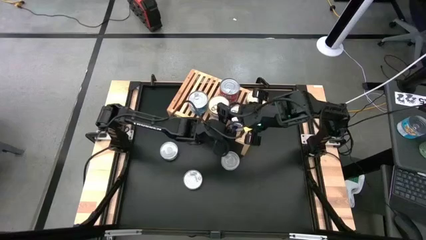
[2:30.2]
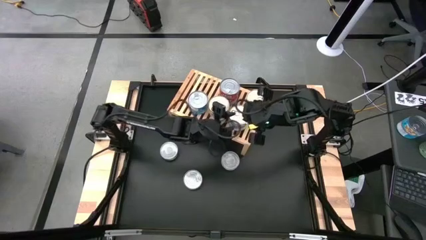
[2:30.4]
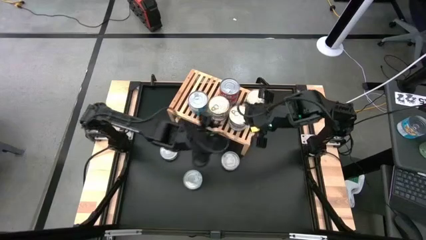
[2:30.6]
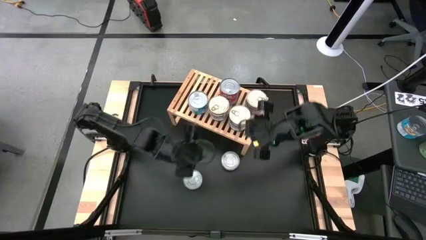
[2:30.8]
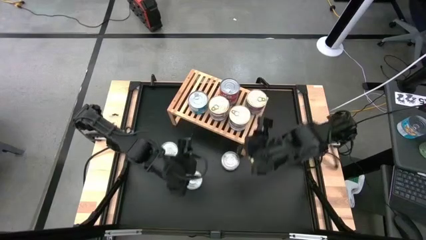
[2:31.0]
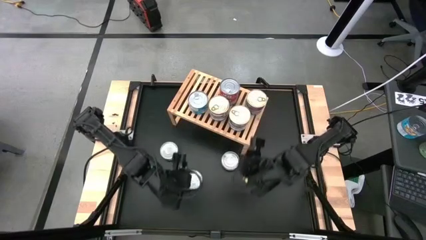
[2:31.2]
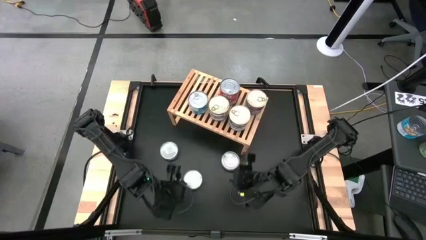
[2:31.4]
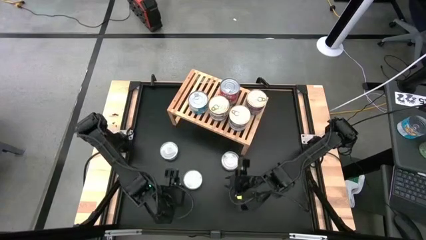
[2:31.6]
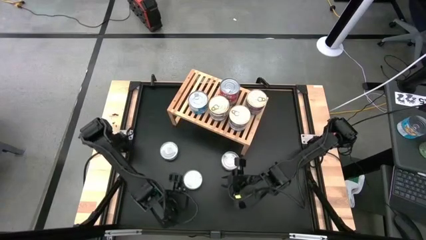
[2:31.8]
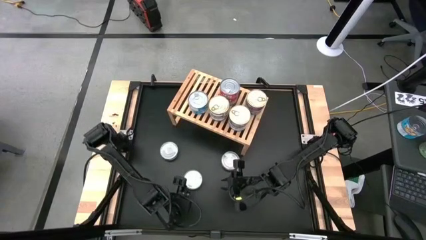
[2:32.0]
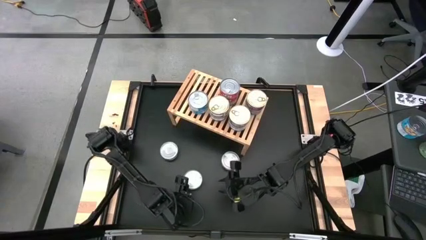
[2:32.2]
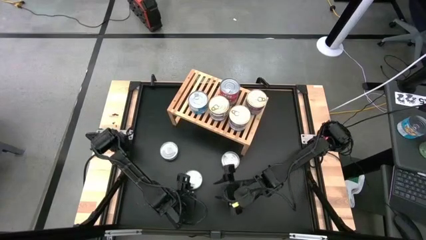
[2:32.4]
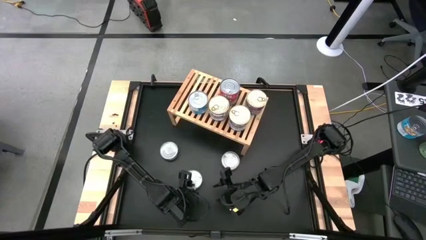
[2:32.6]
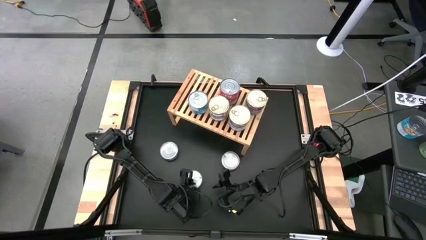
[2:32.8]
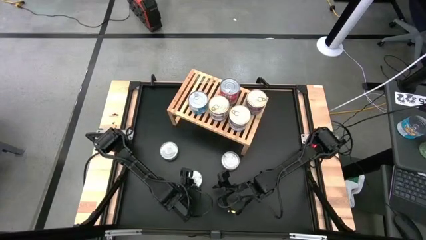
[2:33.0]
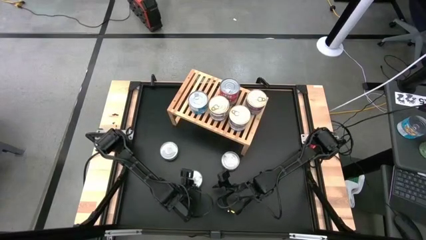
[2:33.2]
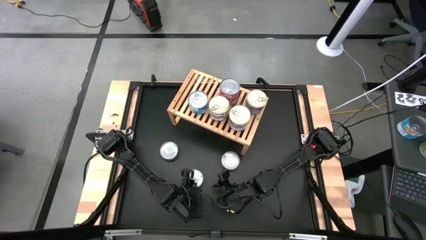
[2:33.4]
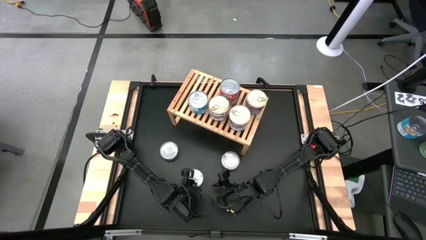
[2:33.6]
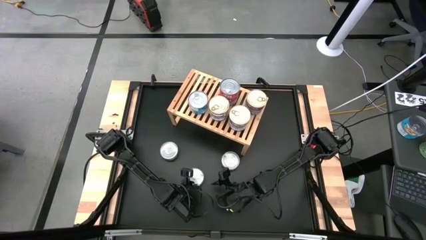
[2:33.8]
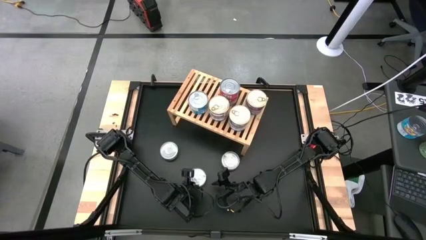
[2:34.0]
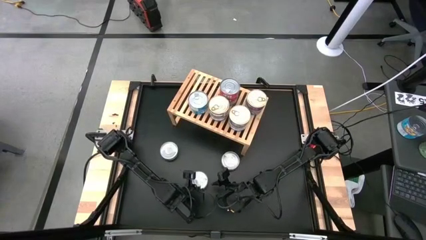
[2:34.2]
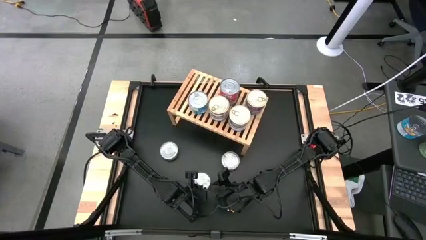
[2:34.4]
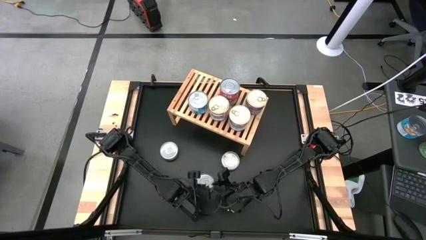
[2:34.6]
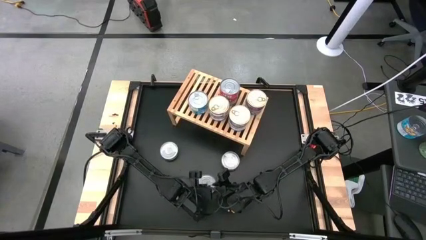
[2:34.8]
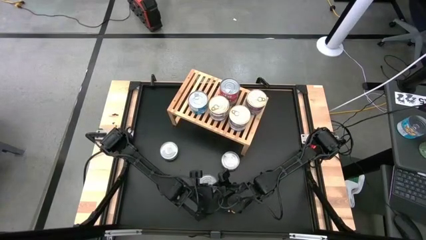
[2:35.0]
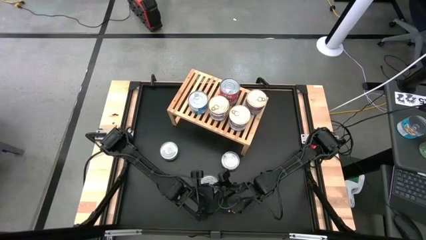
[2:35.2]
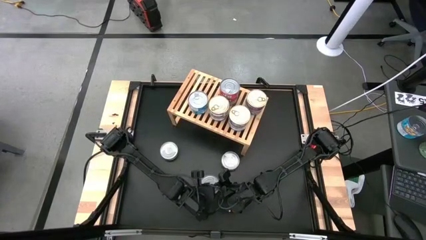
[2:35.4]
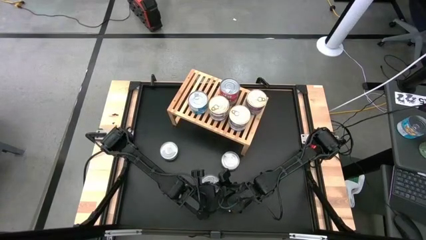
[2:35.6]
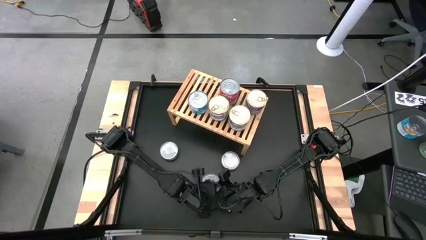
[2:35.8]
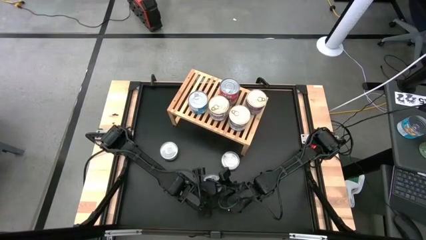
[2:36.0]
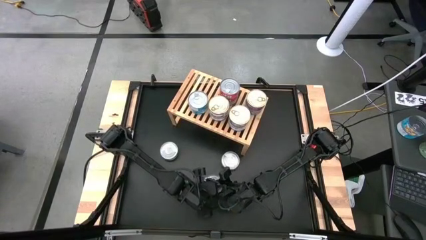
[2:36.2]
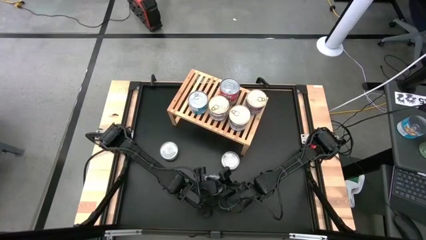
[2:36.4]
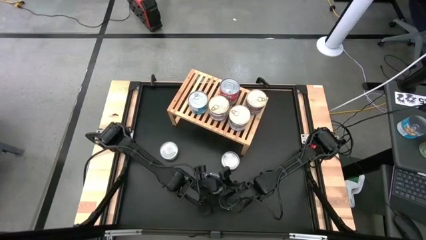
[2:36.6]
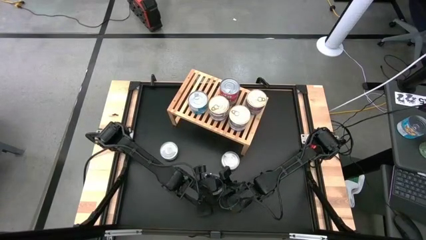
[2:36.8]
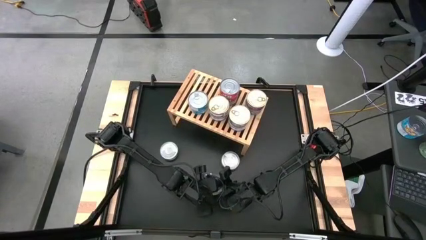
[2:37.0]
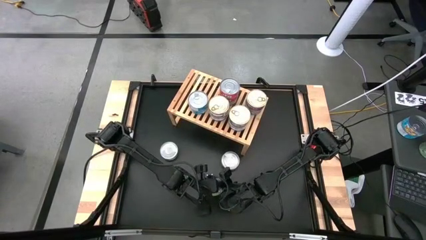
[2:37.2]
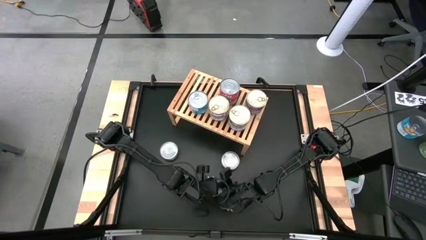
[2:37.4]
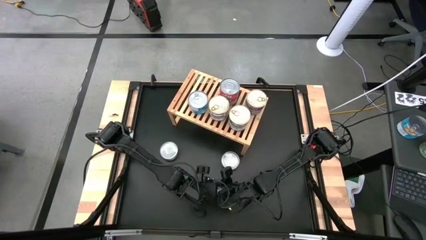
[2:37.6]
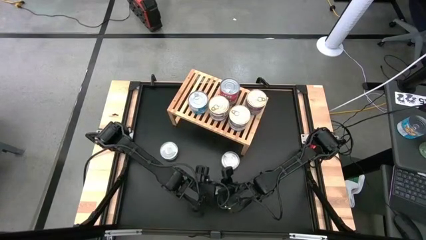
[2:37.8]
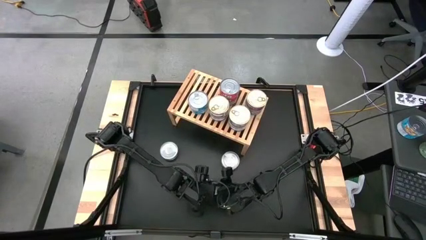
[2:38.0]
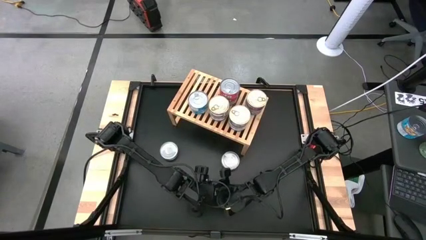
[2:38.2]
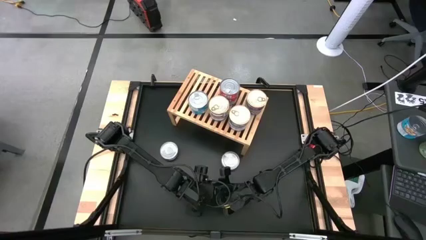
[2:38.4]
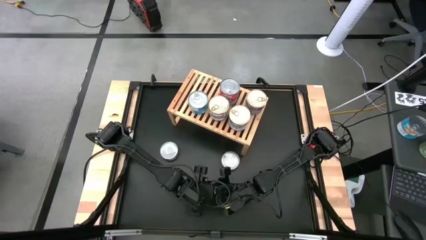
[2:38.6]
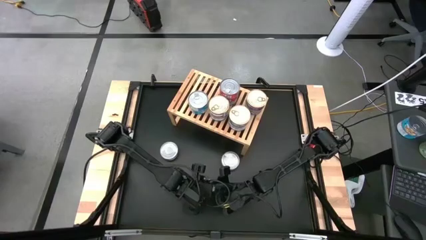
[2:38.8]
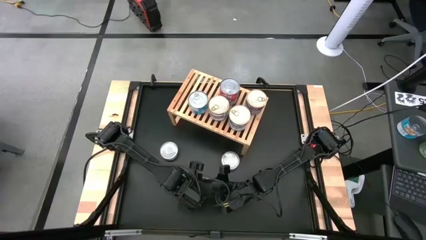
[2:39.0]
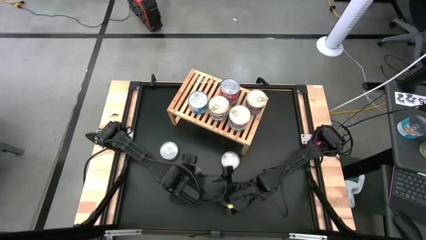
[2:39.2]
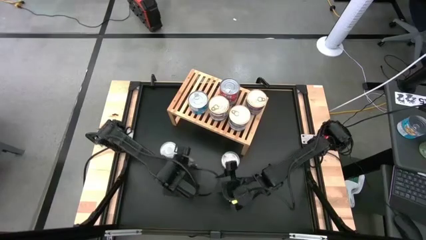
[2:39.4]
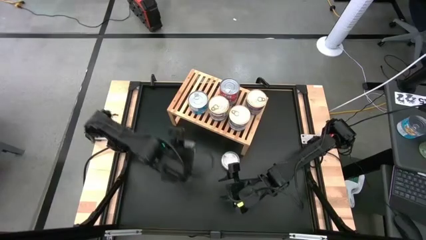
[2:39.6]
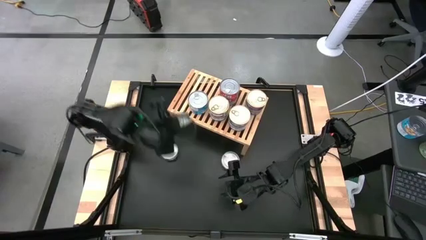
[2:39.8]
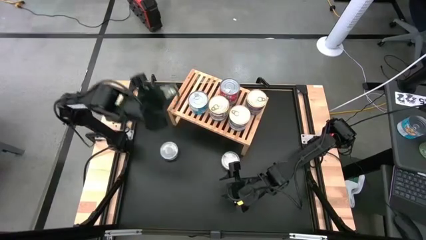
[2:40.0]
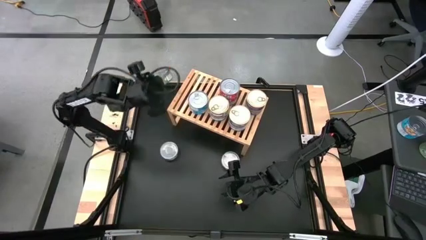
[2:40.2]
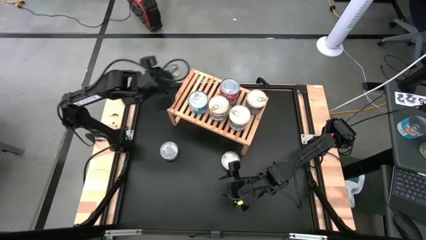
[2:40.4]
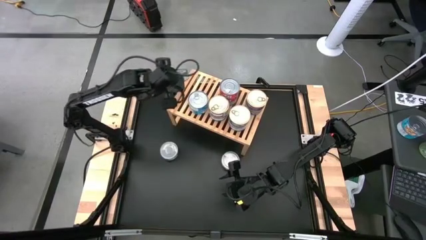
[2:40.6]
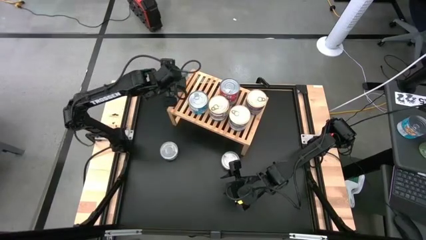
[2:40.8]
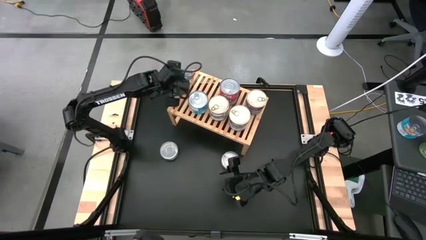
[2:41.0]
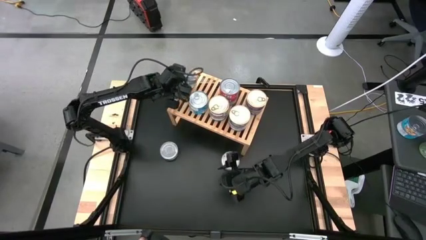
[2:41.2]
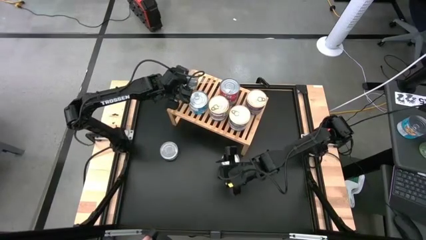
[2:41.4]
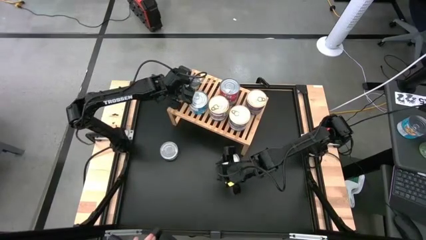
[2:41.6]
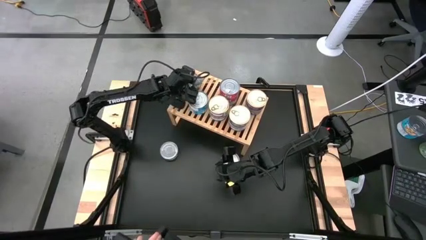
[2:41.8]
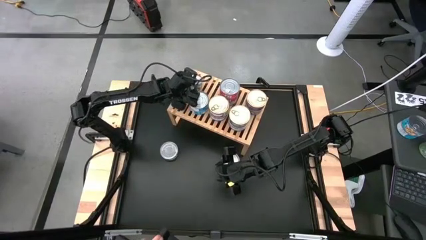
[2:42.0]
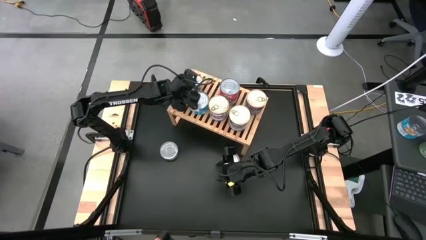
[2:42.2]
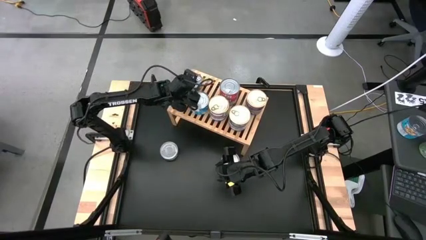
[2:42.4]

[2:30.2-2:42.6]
Task: Stack canned seafood by type on shelf
Put the green tuna can on the shelf

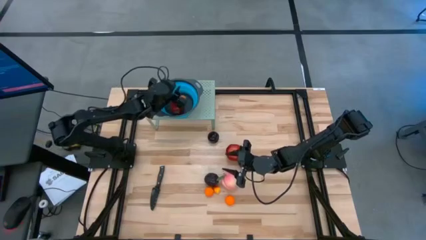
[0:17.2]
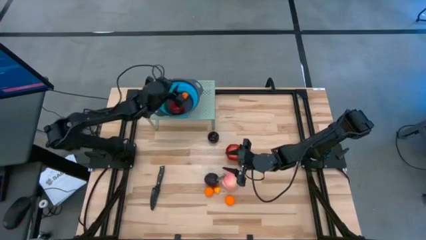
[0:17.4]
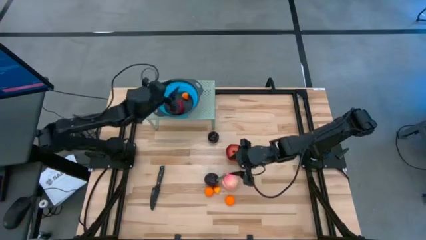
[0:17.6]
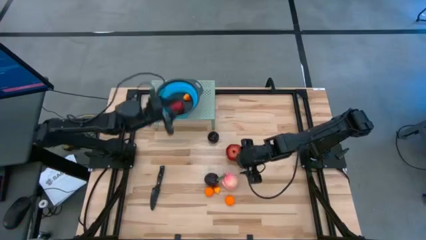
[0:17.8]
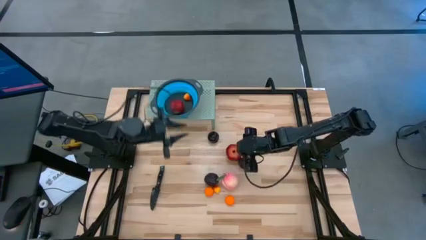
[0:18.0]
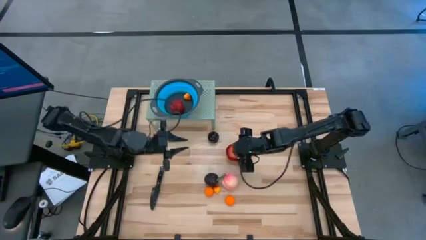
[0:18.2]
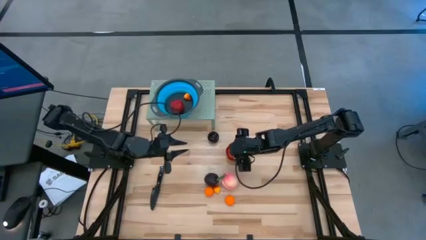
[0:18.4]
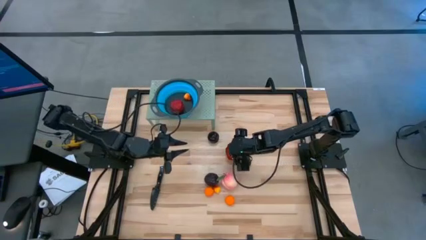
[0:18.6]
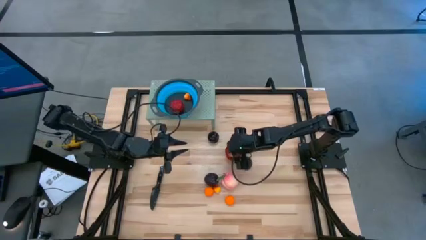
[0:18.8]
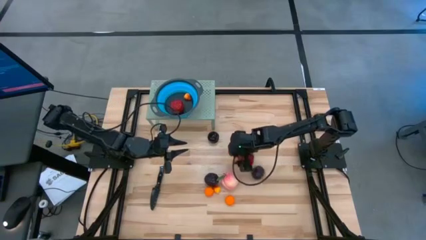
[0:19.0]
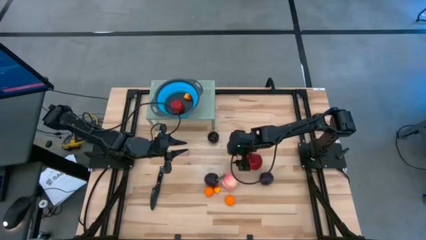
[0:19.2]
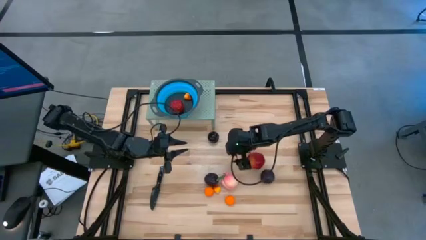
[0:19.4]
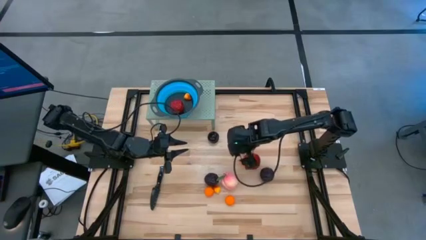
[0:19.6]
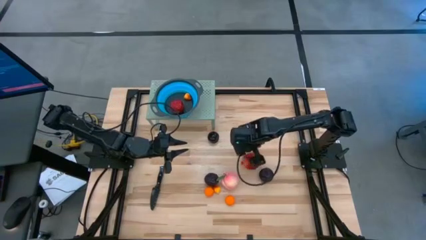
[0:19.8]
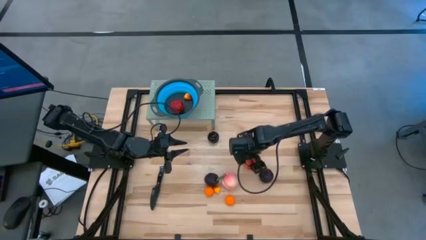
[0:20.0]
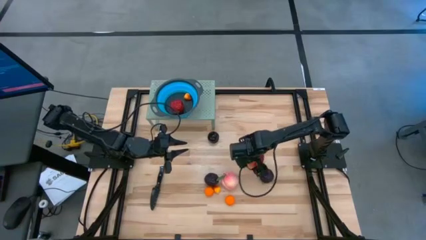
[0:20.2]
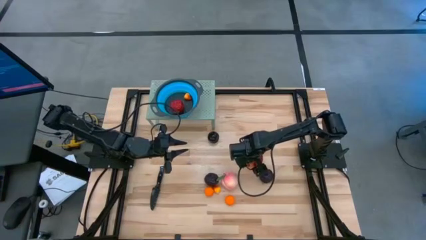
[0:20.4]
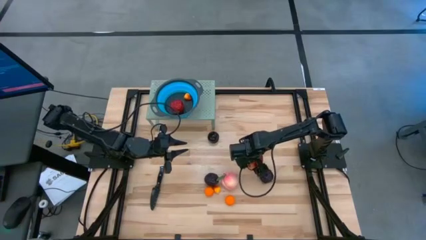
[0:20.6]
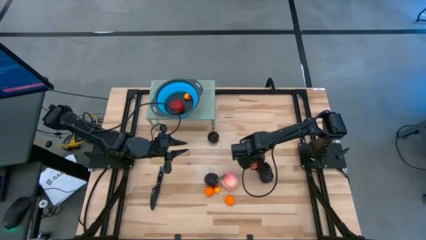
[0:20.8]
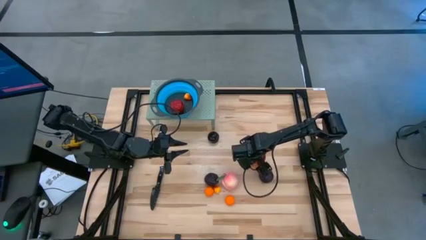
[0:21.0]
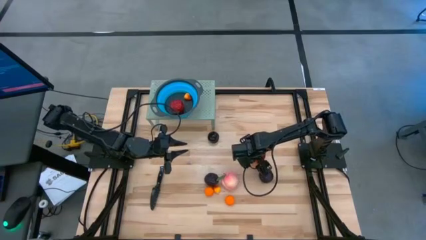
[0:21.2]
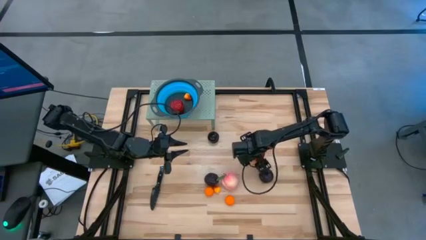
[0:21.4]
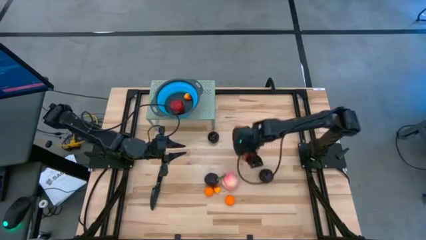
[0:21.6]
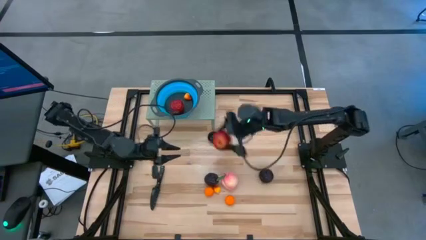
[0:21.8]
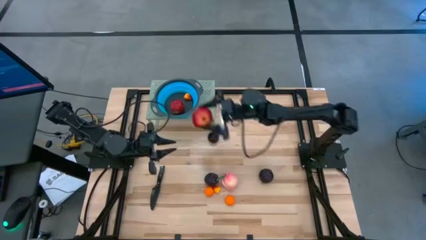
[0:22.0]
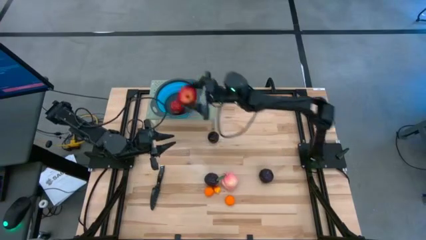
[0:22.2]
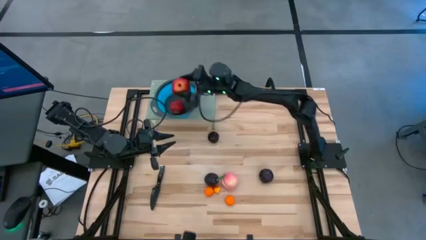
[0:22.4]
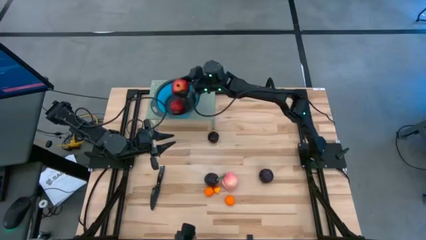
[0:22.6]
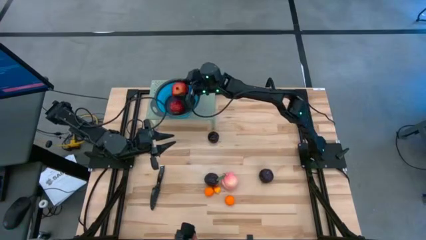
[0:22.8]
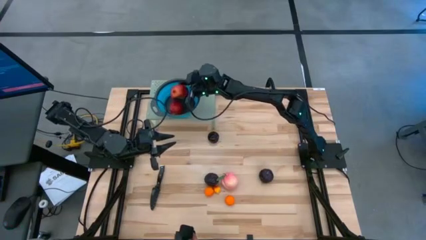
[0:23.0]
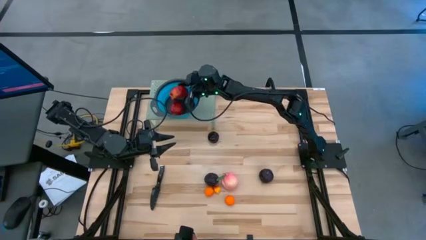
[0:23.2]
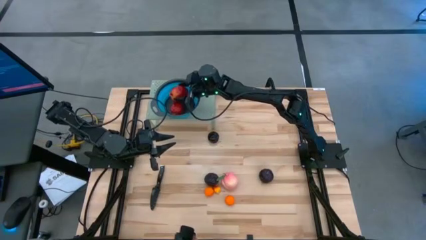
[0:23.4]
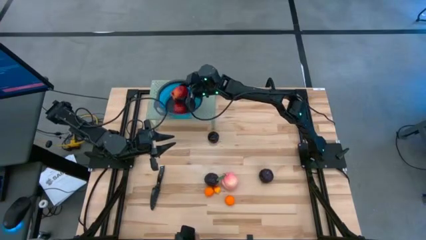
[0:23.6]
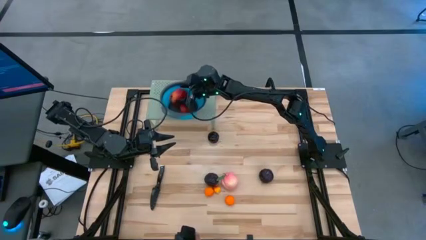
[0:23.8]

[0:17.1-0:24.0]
Task: Pick & Place Fruit
Put the red pomegranate into the blue strainer bowl on the shelf
